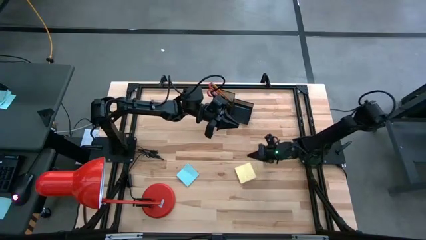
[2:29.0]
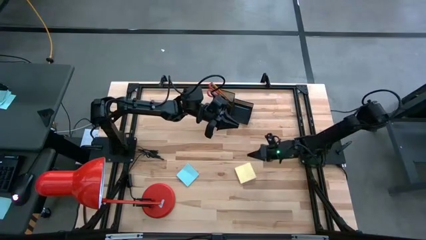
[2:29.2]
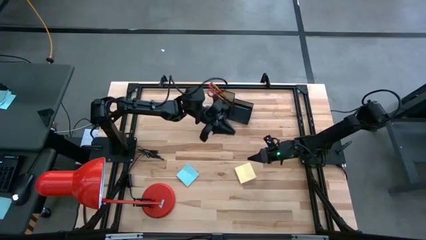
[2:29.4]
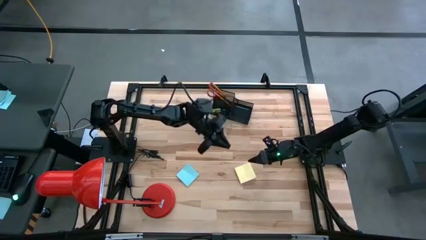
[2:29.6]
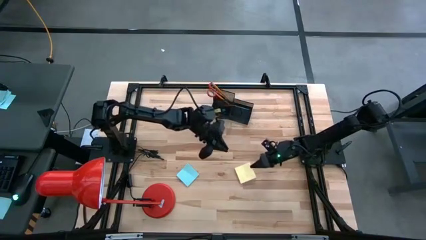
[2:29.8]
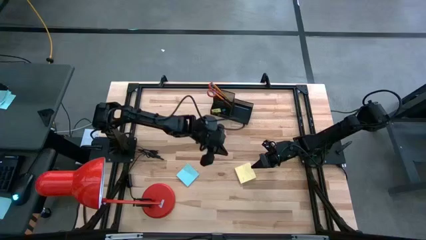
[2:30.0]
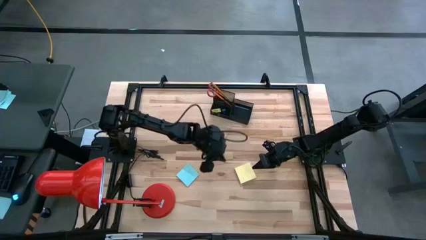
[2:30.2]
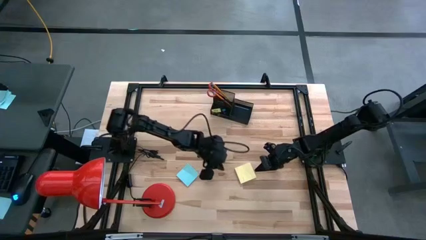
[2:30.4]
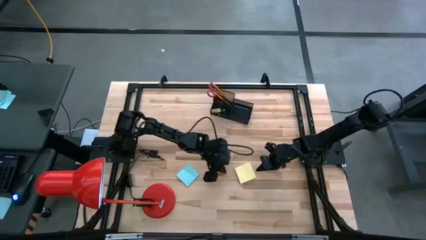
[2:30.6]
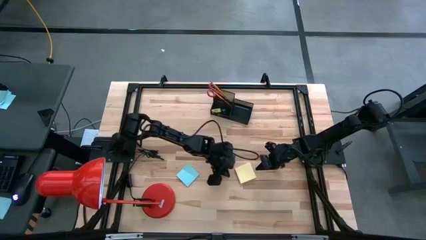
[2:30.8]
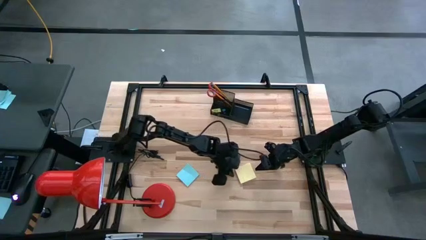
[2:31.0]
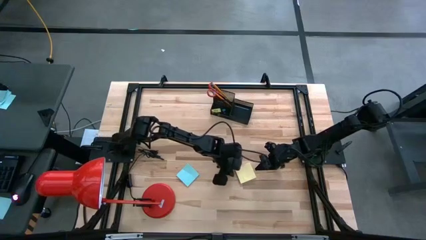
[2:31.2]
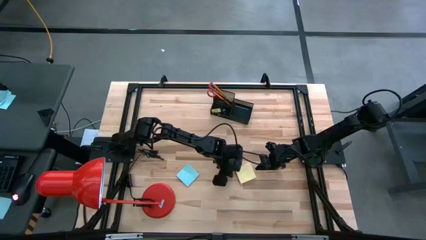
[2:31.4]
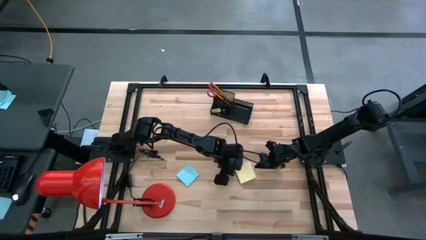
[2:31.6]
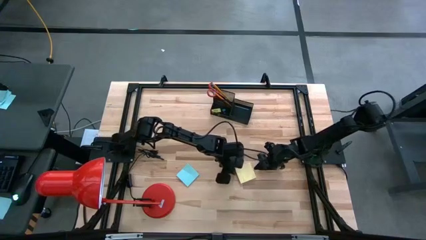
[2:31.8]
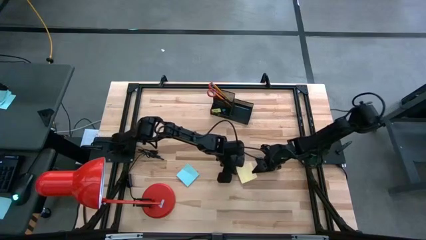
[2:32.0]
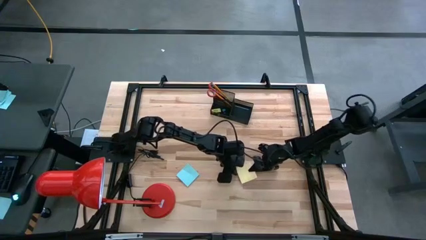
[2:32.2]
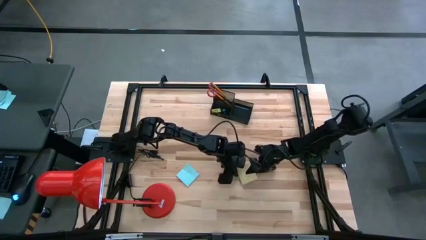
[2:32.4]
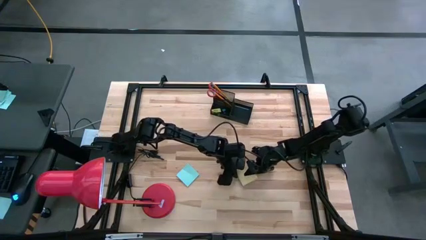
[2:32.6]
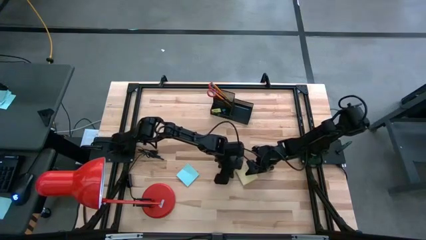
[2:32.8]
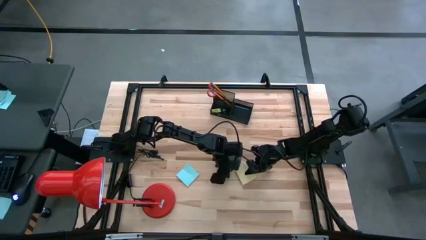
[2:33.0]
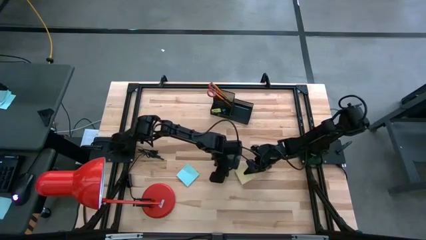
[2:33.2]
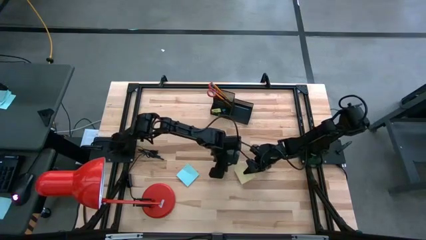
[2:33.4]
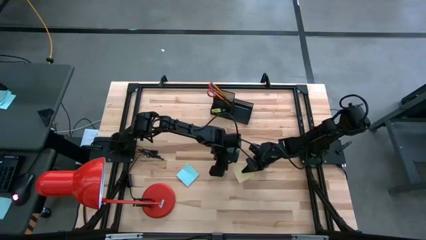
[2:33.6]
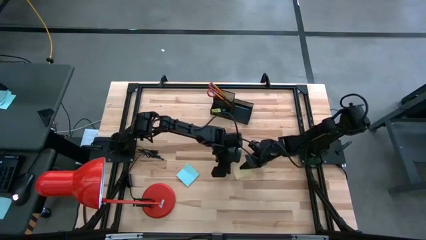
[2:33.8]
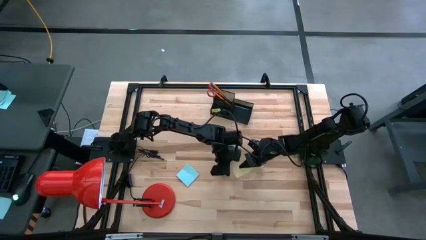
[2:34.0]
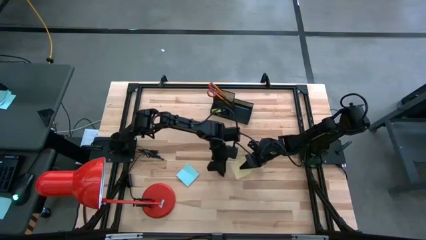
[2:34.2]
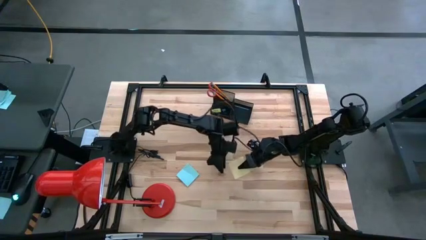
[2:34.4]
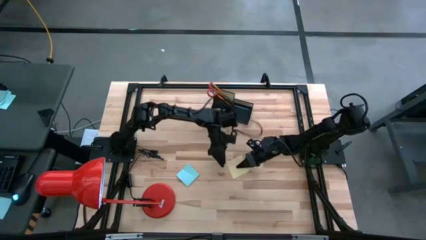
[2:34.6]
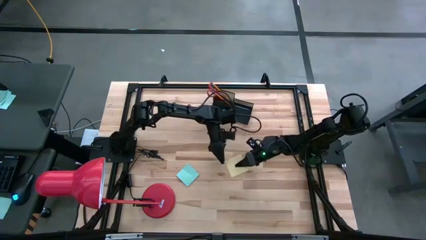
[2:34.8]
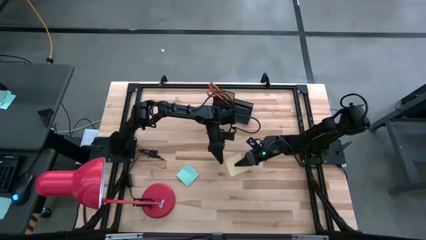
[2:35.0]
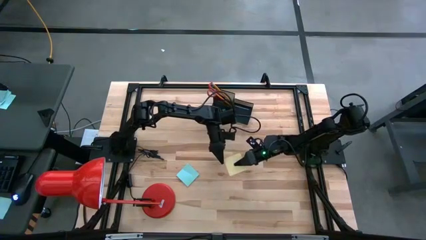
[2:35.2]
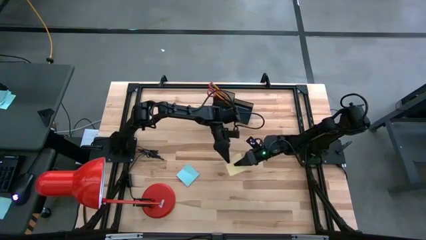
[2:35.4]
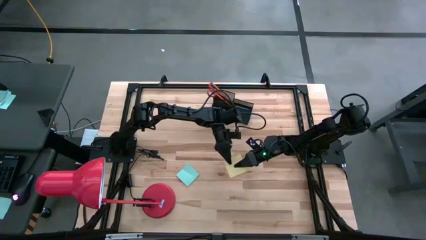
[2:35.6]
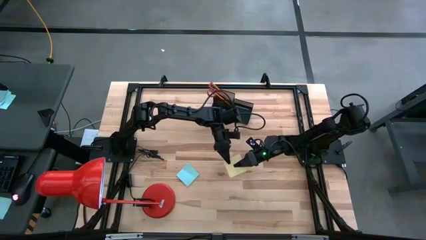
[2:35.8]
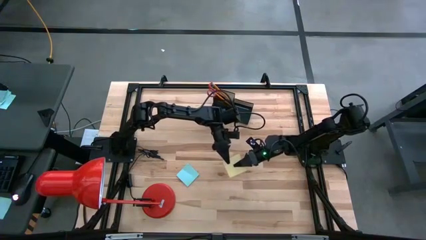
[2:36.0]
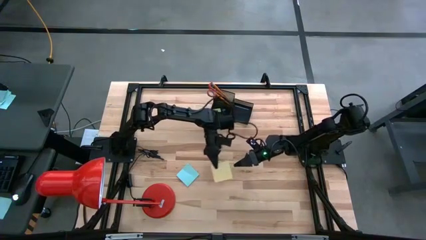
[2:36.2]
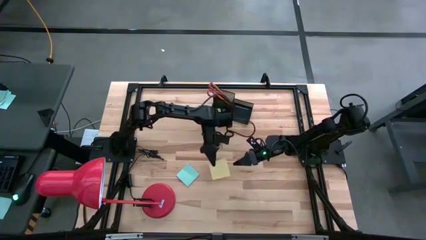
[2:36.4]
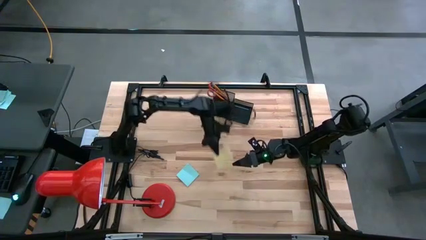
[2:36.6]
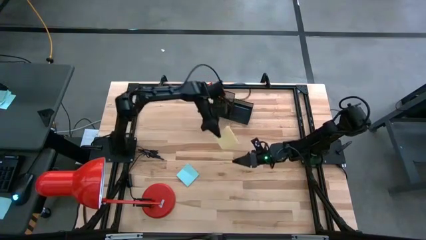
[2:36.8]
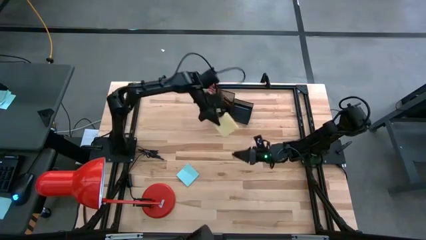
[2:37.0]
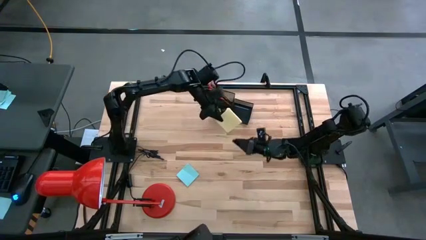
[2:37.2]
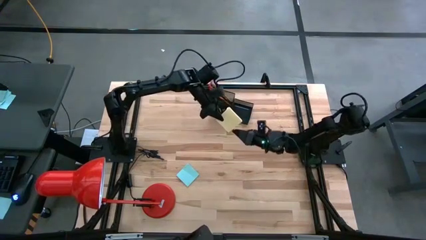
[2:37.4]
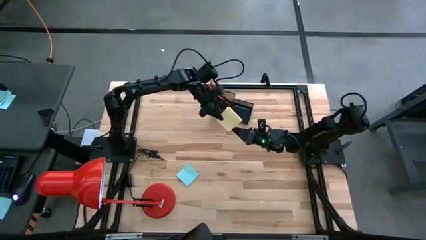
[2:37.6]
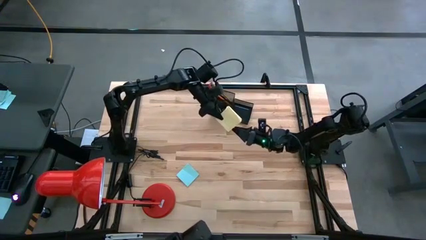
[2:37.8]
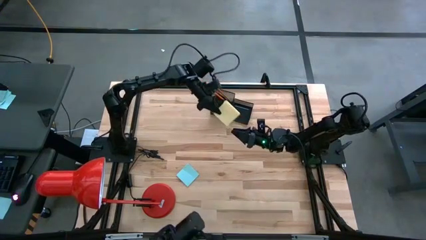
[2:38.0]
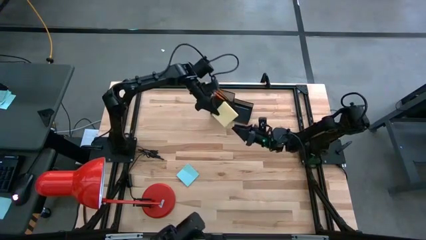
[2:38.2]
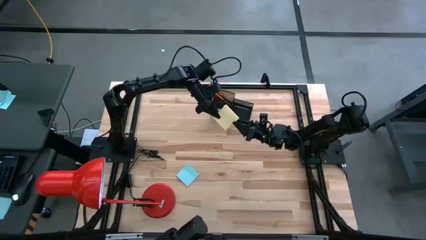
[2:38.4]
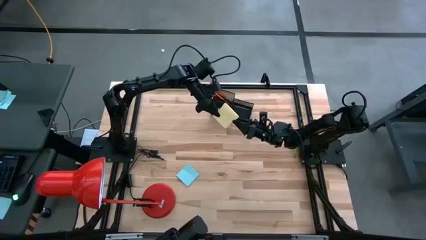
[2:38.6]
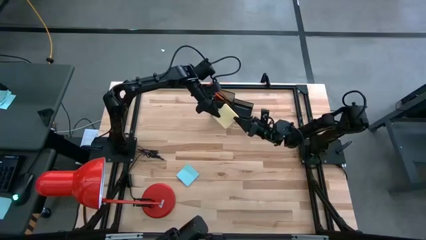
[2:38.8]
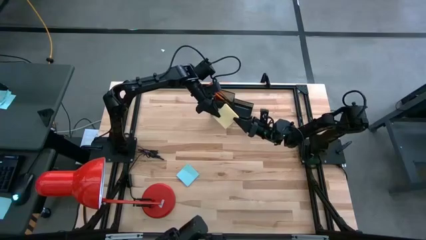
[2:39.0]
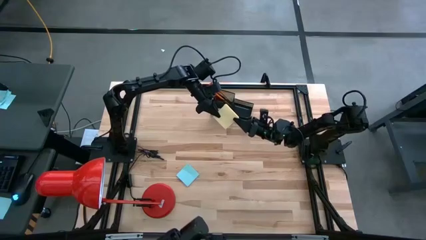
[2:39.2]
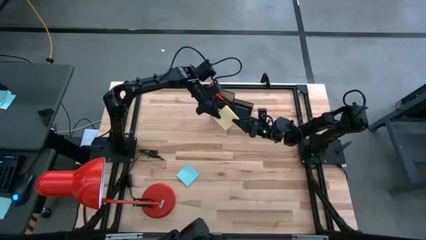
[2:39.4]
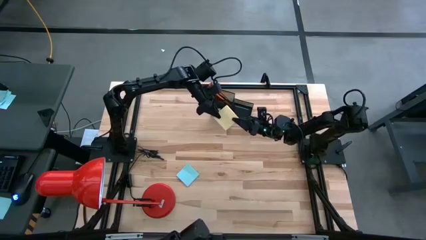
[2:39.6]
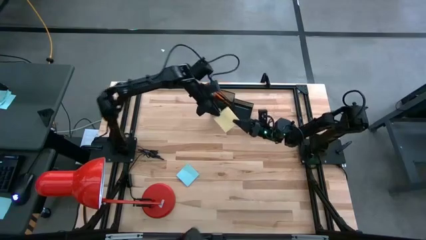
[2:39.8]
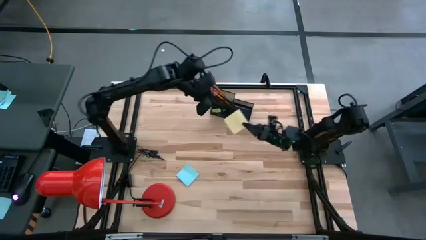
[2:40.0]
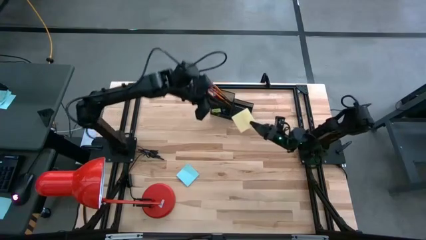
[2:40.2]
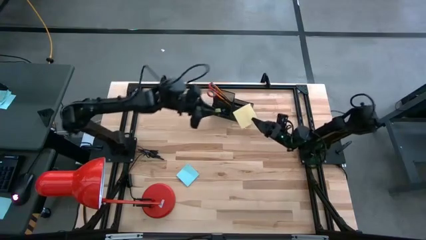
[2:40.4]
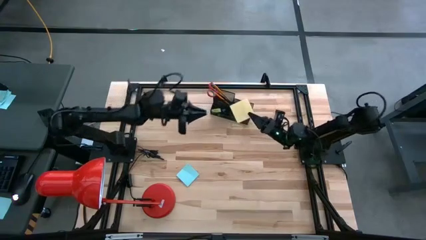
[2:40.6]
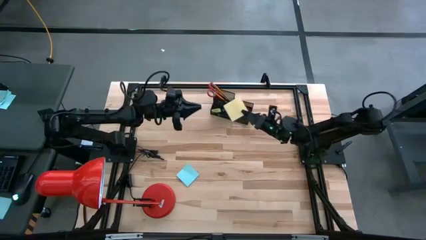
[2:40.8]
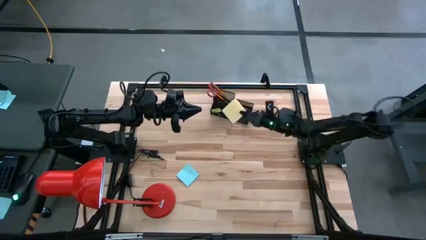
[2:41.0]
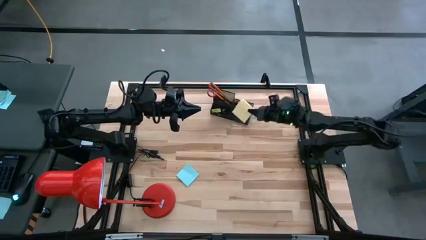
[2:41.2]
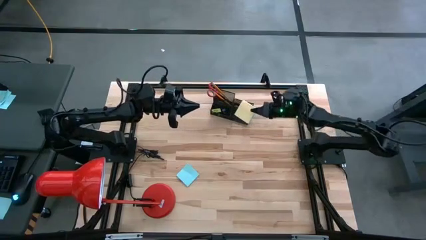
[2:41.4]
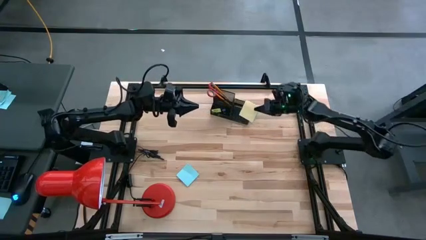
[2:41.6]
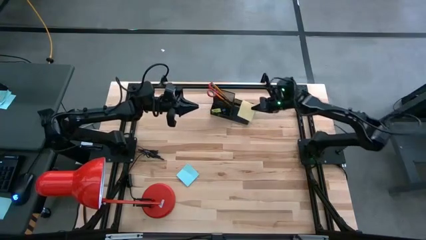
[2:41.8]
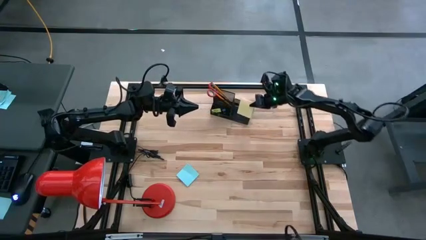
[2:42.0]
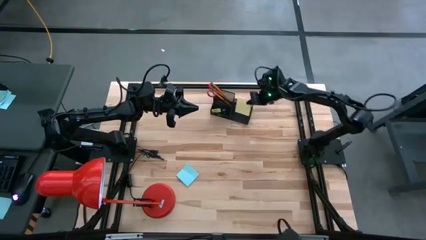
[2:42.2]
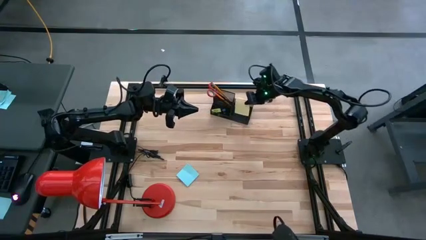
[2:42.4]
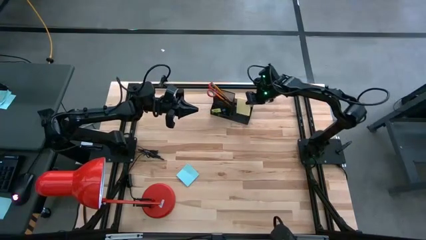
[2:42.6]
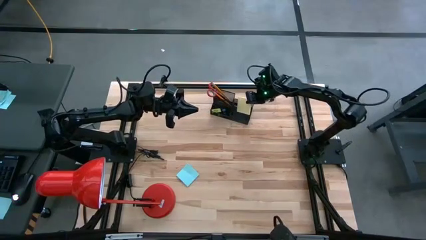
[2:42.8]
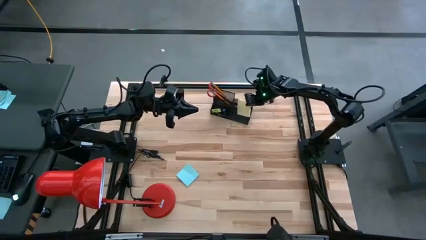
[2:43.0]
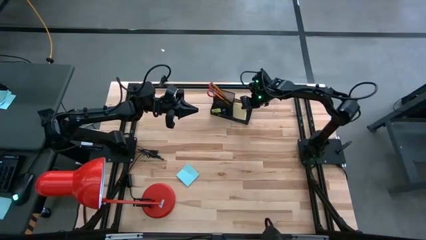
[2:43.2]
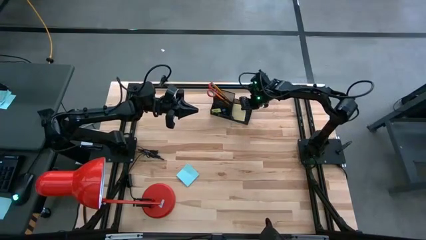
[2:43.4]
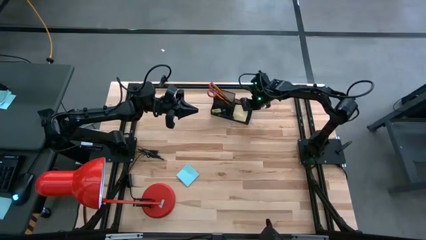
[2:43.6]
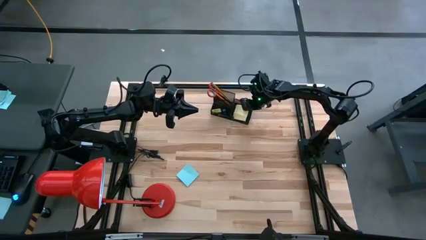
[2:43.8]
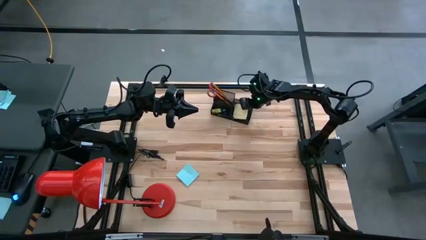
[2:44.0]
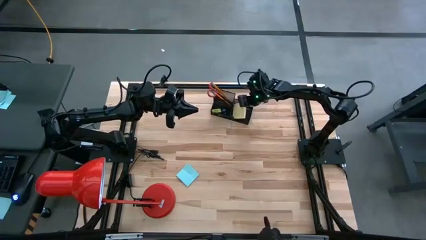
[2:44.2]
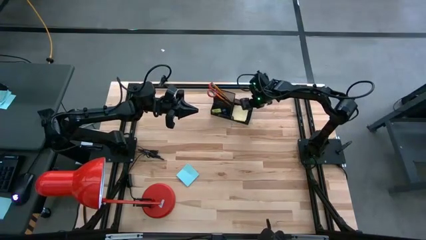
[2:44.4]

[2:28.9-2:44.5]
Task: Pick and place office supplies into organizer
Put the yellow sticky notes in the black desk organizer
